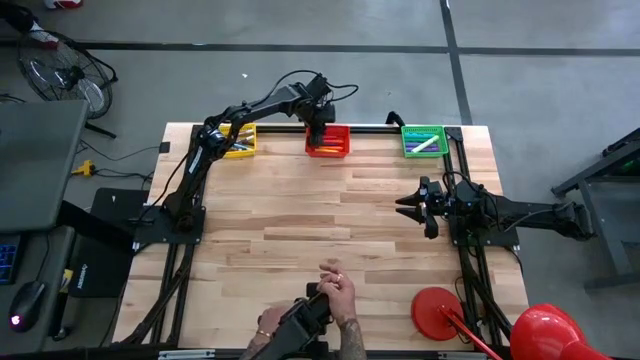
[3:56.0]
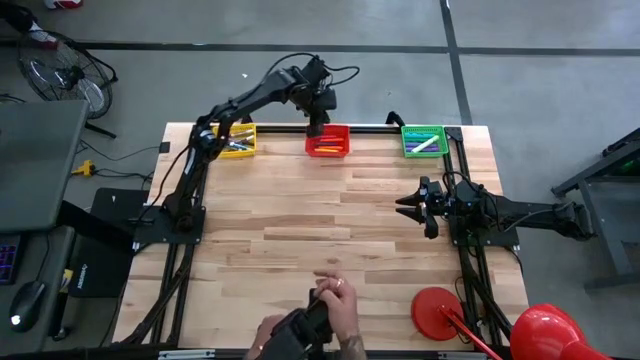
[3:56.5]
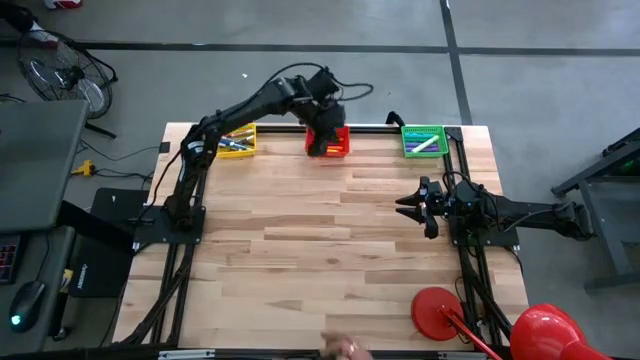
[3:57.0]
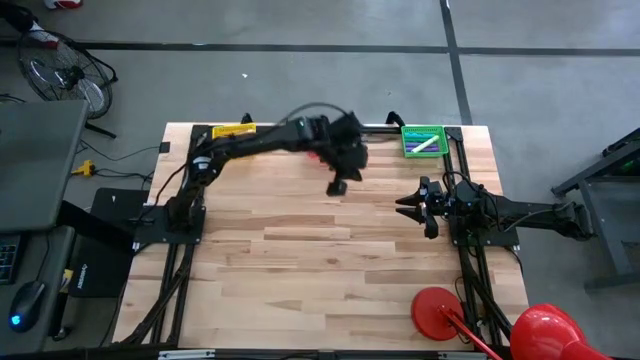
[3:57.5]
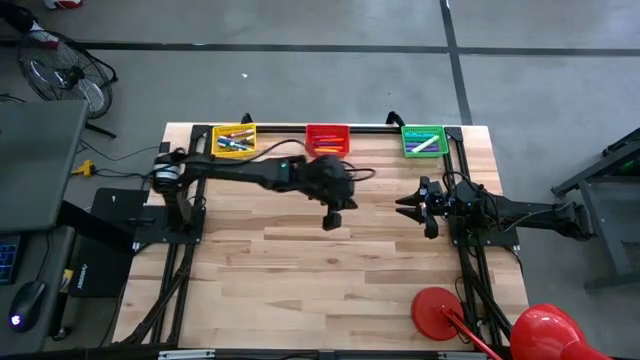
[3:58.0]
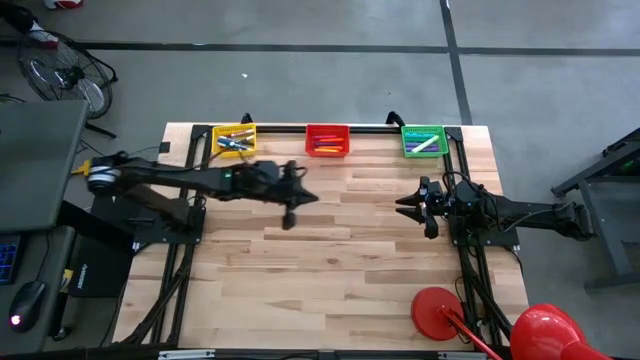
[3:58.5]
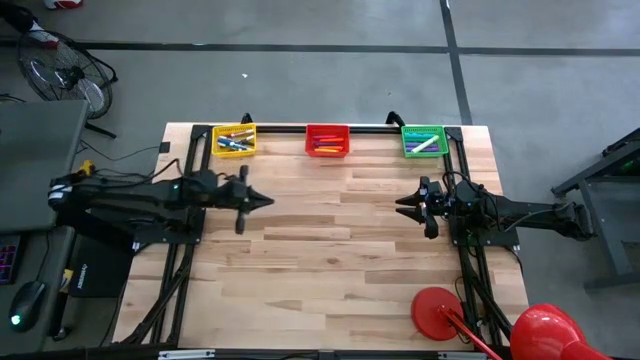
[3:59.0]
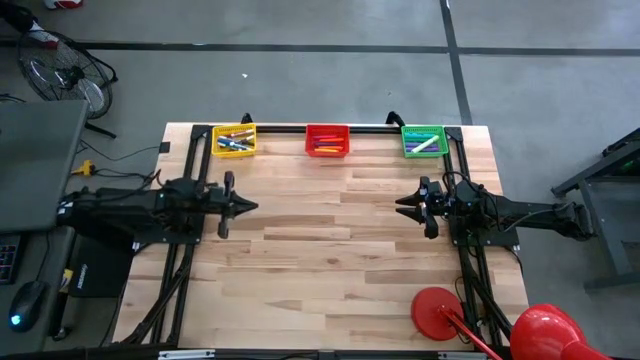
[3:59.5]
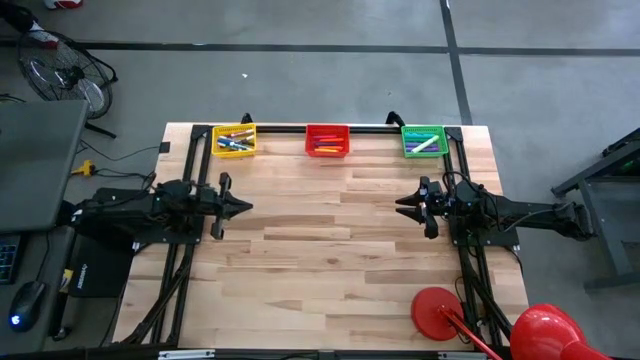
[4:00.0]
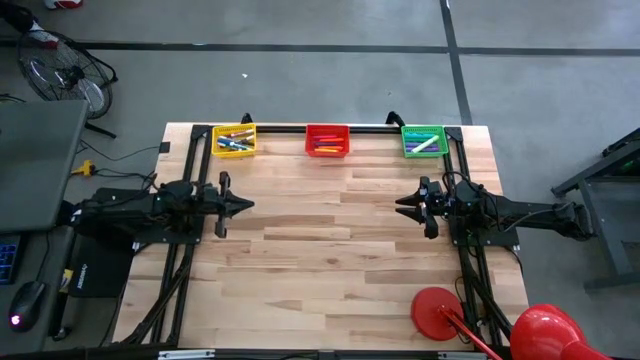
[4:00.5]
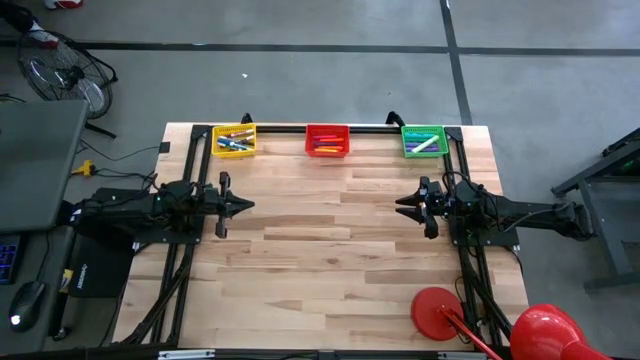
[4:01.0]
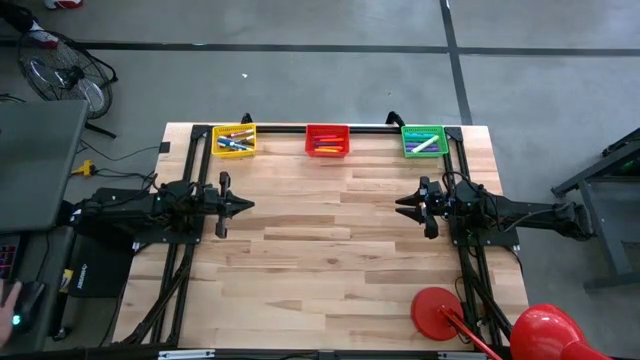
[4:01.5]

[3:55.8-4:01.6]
Task: Pick & Place Markers
Return to Home Position

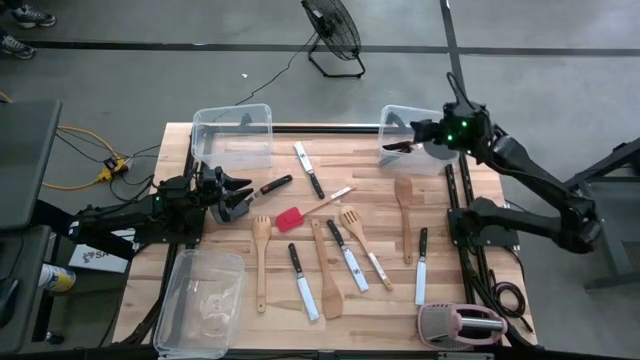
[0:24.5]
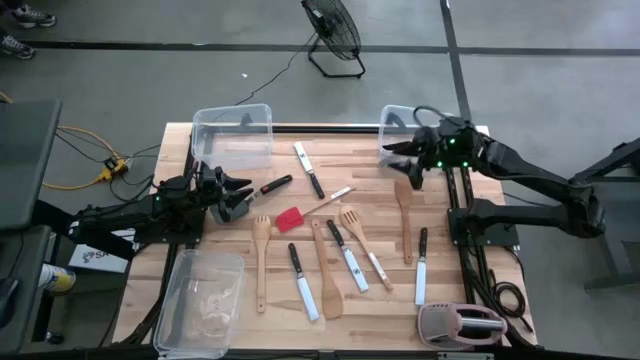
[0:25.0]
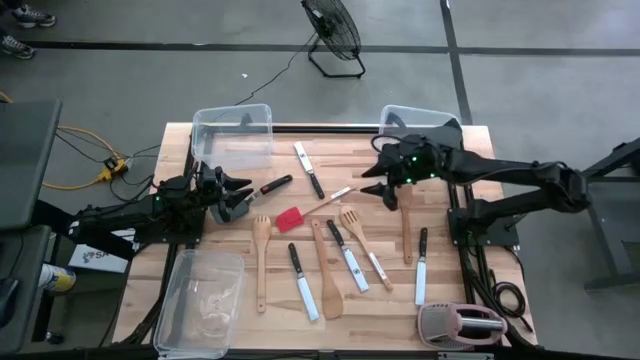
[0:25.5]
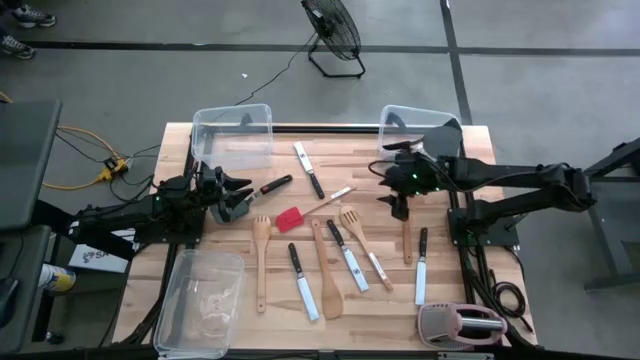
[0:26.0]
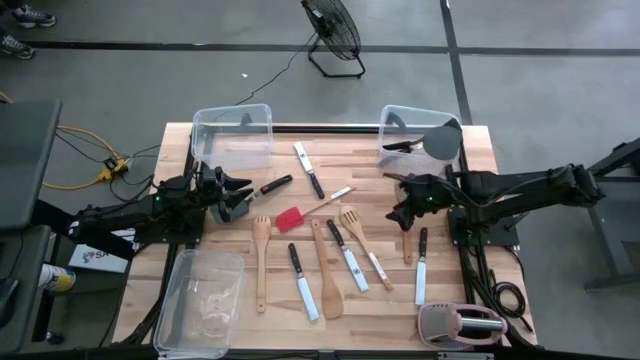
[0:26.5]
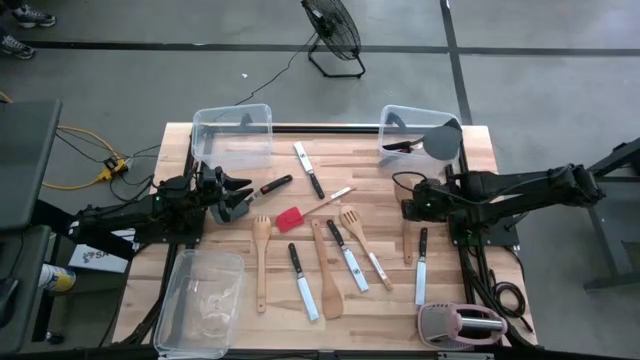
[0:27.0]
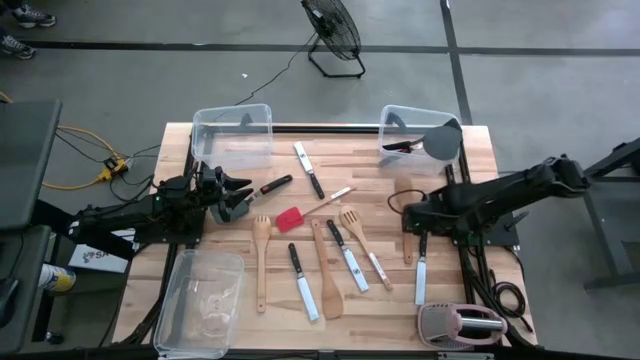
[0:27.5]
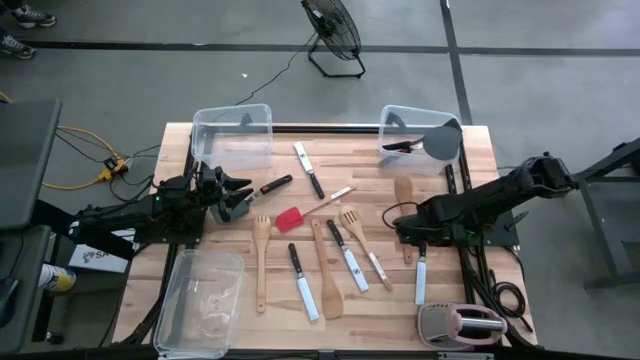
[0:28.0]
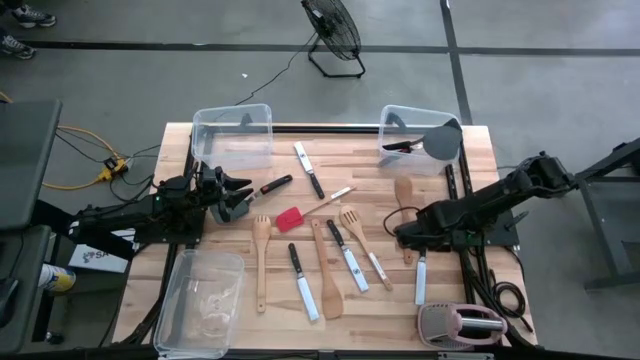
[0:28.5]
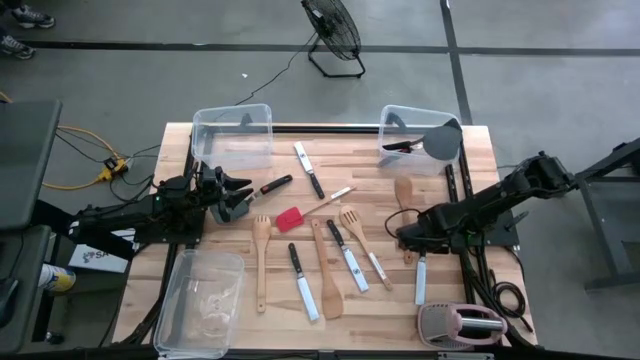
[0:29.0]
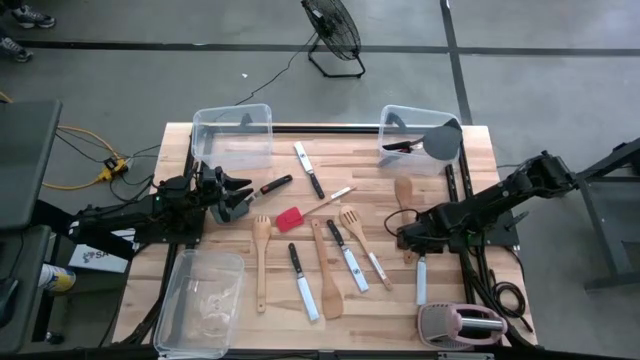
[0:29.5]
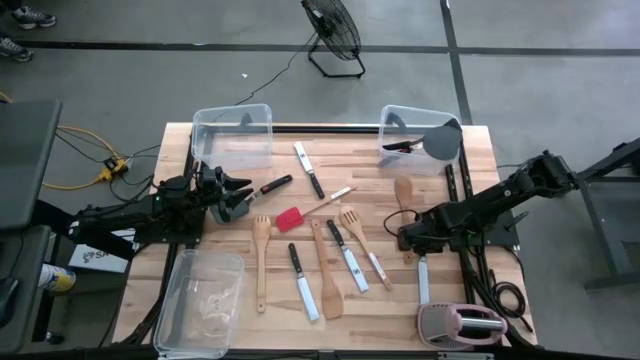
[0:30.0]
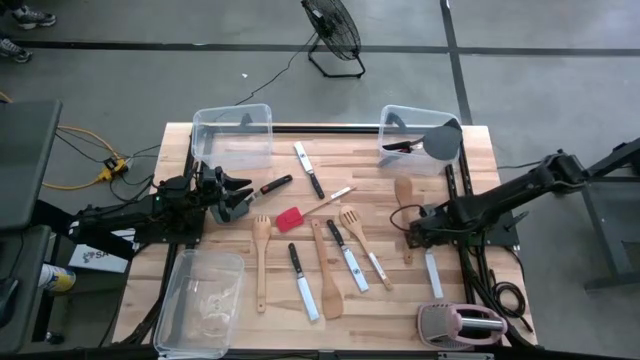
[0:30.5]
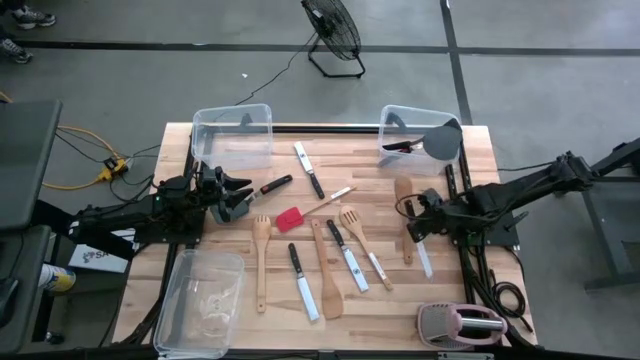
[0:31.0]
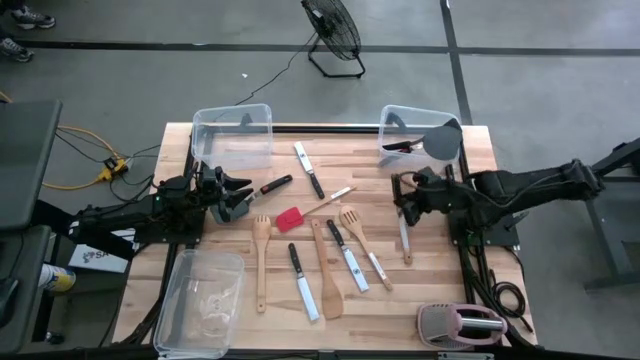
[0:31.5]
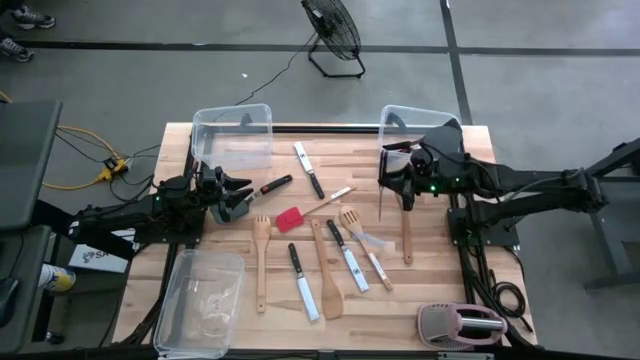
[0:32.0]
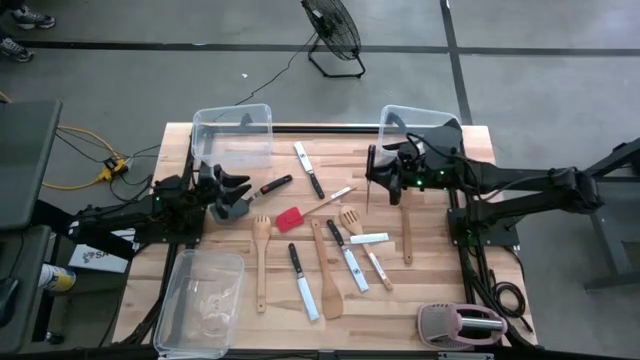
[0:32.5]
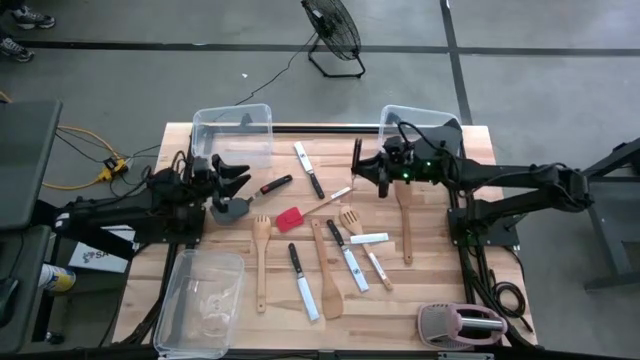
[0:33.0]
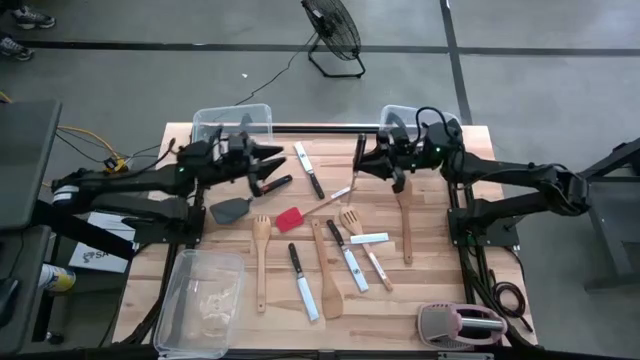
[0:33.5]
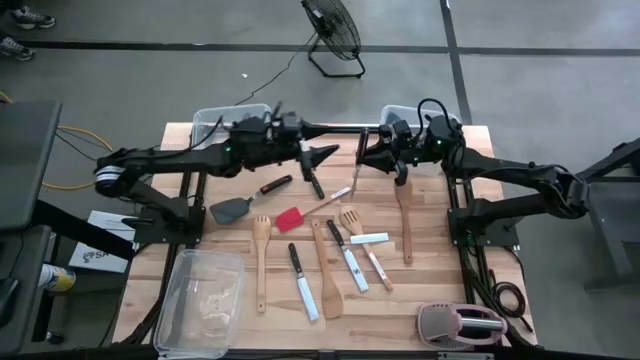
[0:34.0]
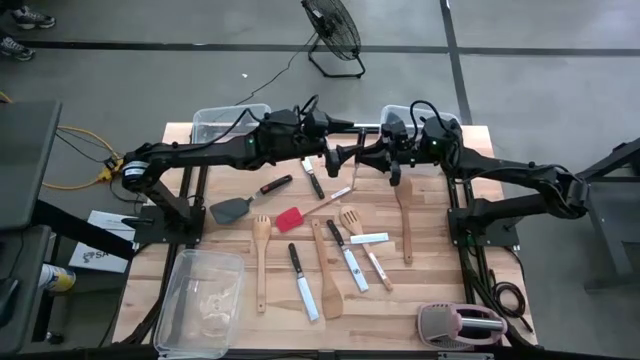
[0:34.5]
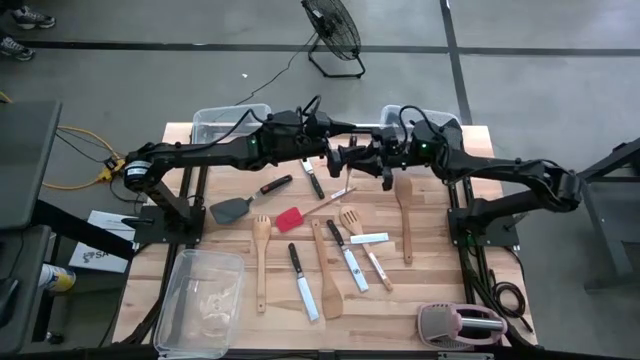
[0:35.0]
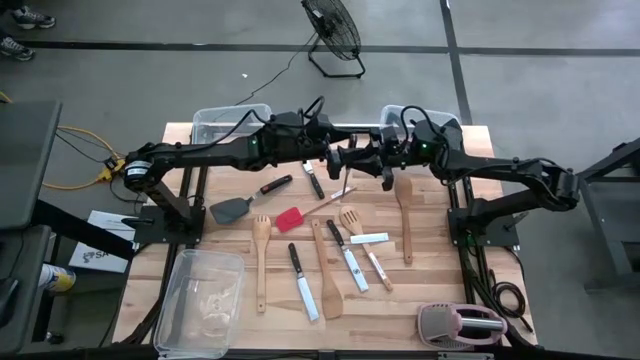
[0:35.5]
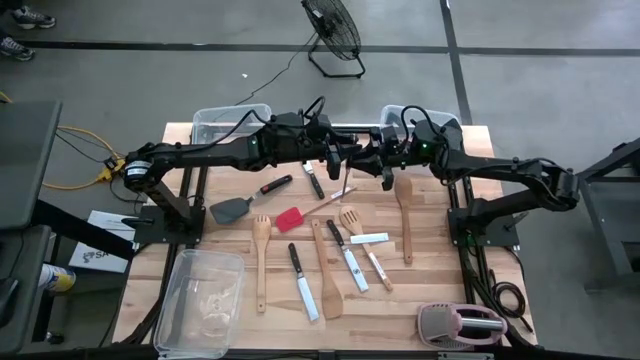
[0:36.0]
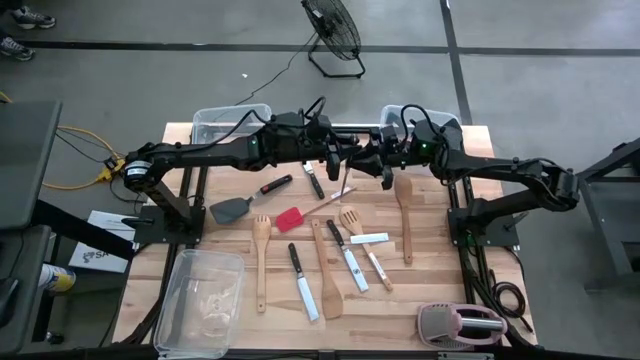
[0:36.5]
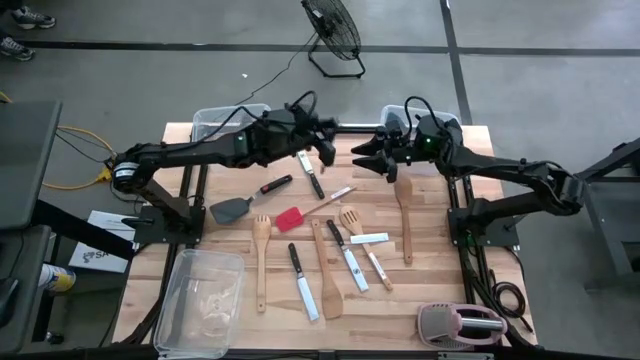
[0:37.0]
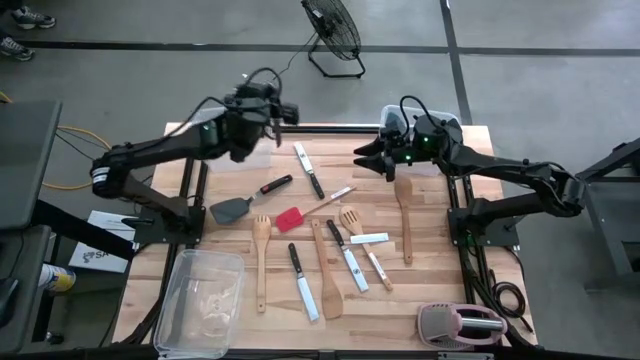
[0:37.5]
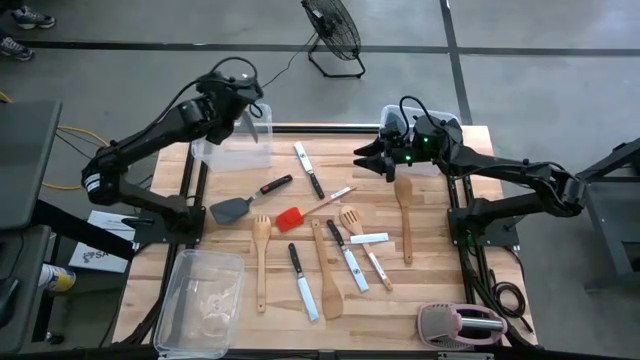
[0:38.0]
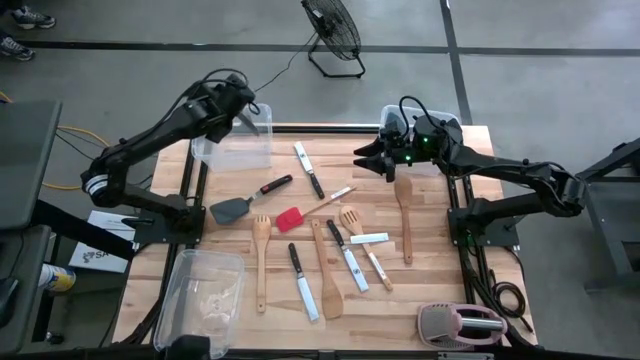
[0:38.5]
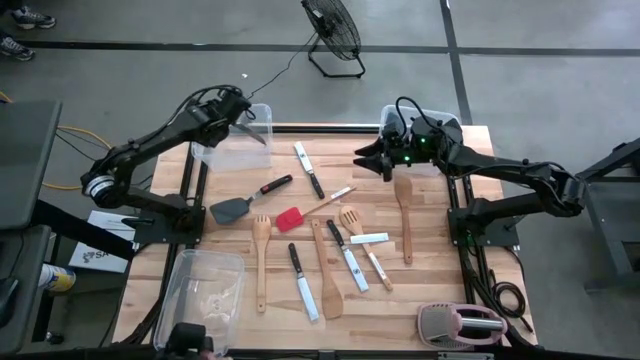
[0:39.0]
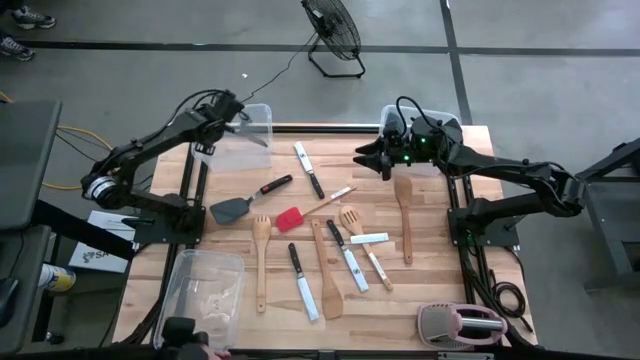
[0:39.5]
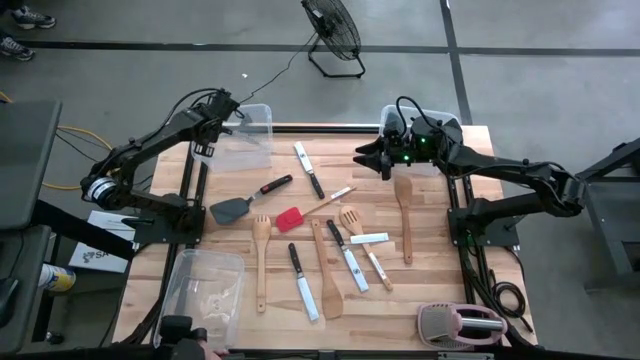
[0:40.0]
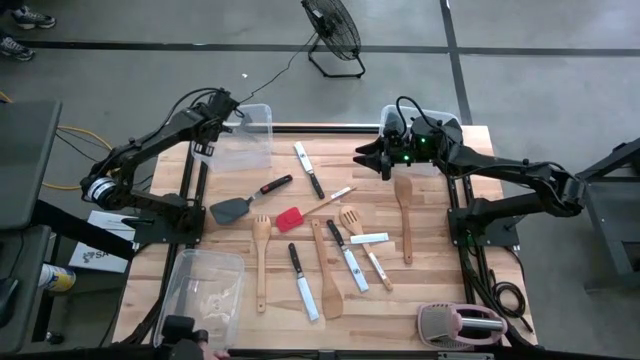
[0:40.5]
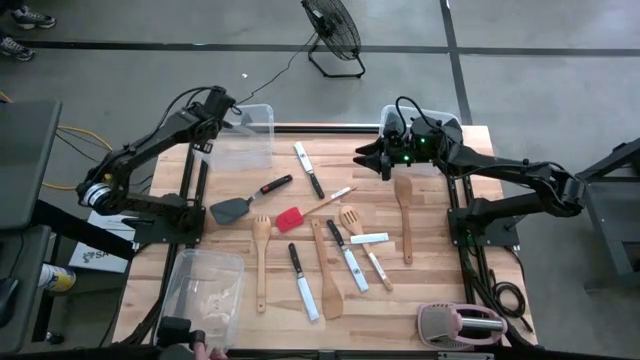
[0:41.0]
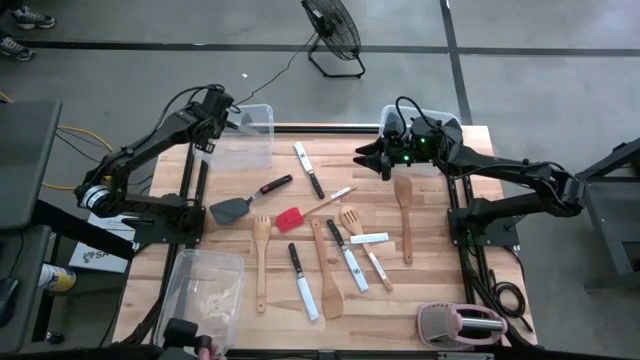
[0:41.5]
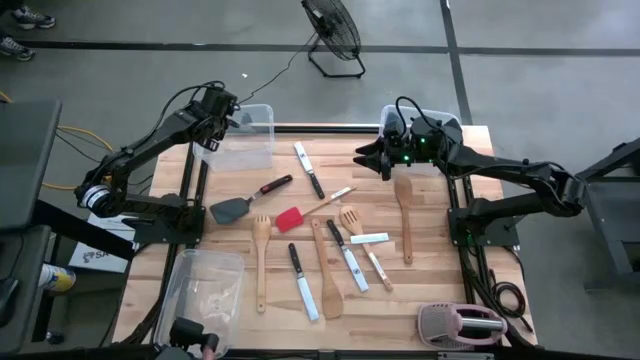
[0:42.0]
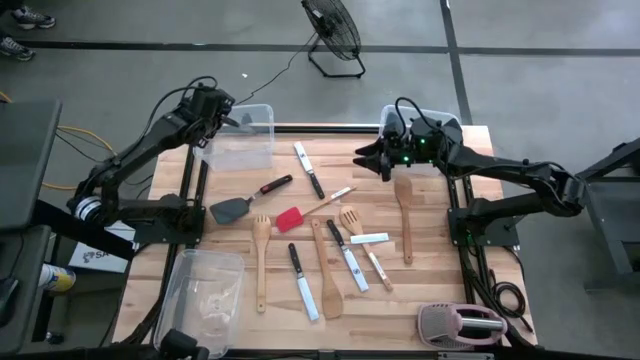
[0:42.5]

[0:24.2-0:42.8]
Task: Pick & Place Kitchen Items
Put the black kitchen knife into the top left transparent bin
